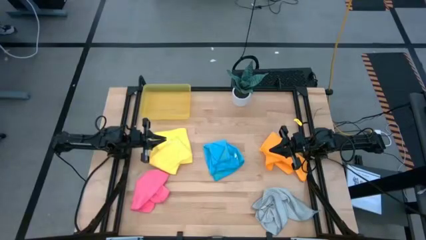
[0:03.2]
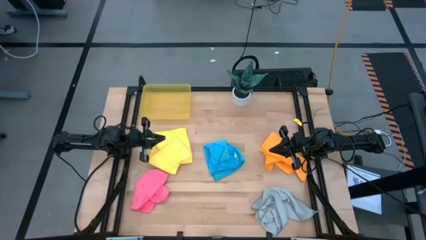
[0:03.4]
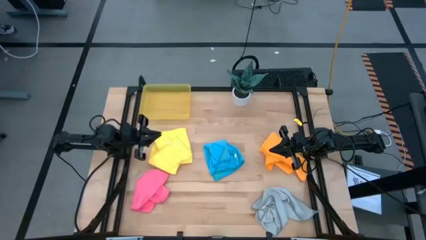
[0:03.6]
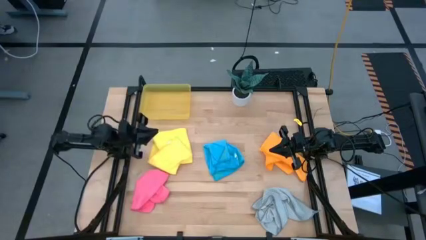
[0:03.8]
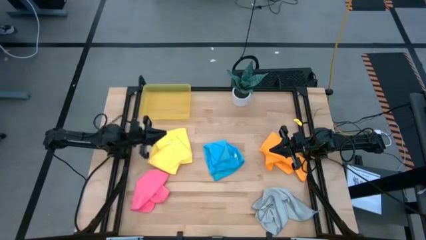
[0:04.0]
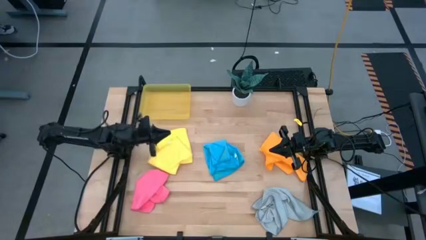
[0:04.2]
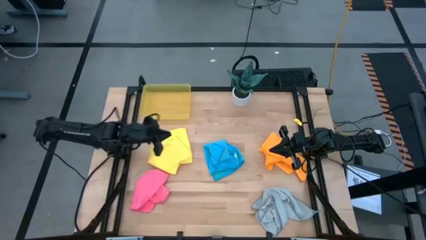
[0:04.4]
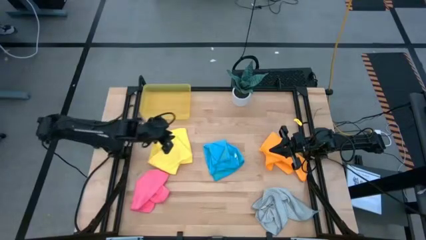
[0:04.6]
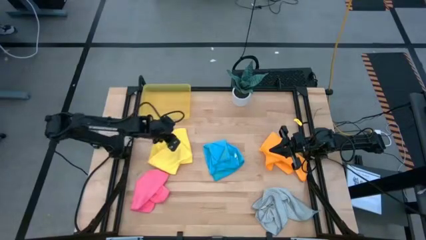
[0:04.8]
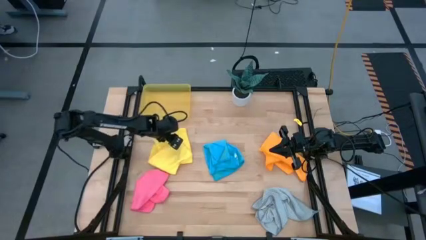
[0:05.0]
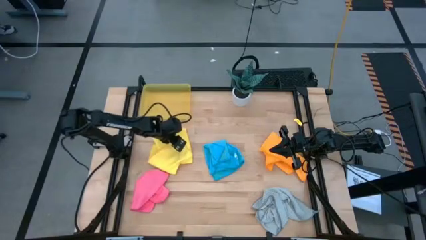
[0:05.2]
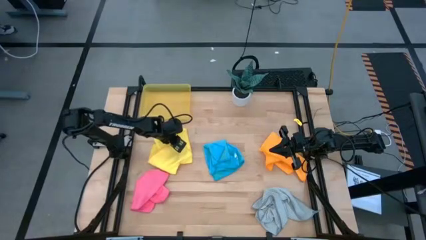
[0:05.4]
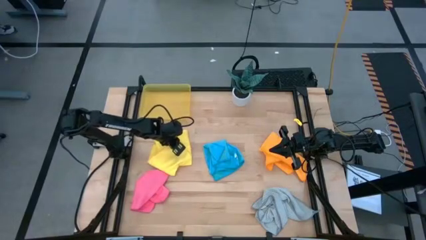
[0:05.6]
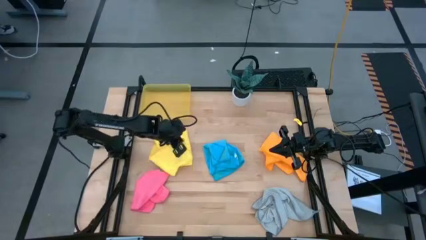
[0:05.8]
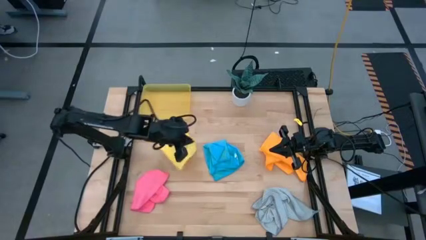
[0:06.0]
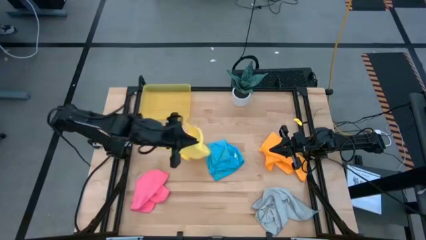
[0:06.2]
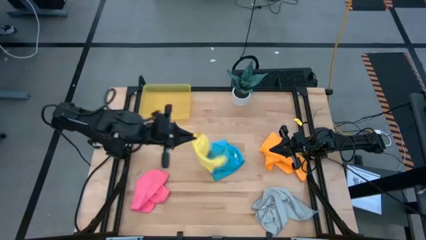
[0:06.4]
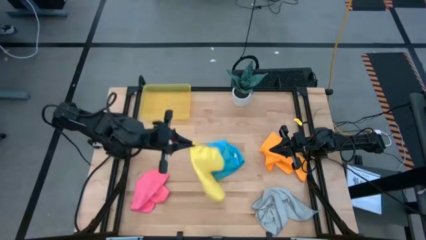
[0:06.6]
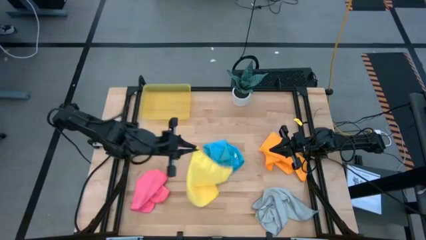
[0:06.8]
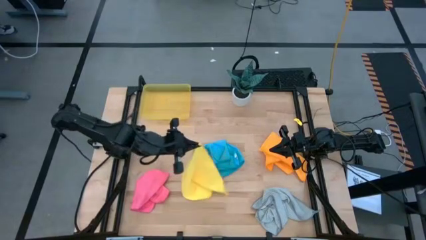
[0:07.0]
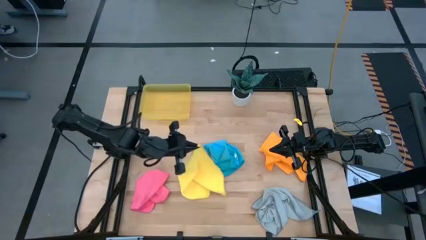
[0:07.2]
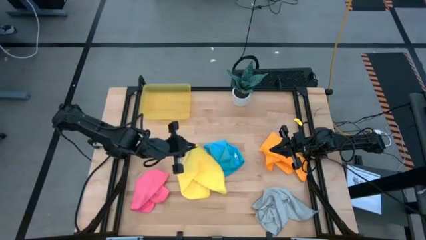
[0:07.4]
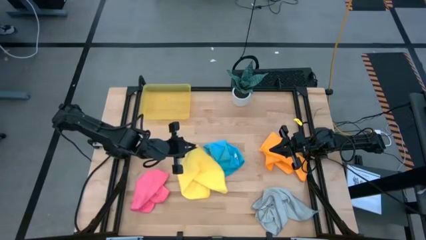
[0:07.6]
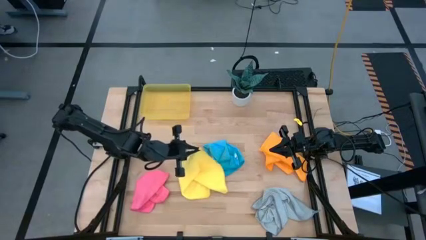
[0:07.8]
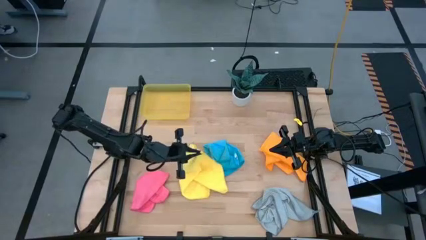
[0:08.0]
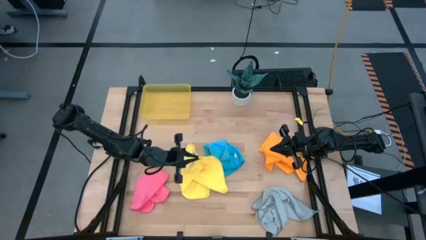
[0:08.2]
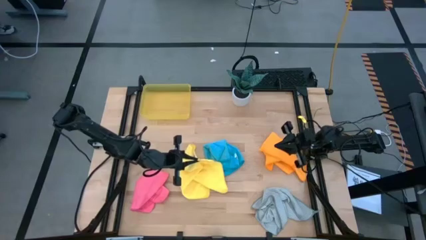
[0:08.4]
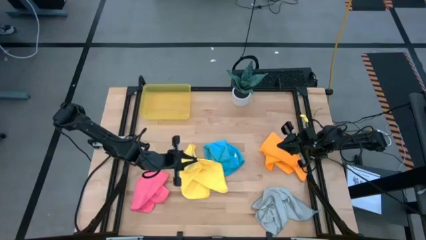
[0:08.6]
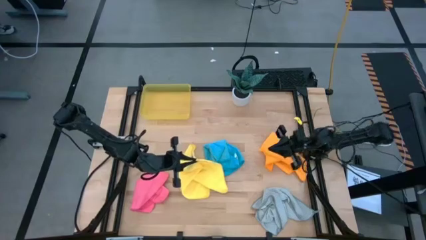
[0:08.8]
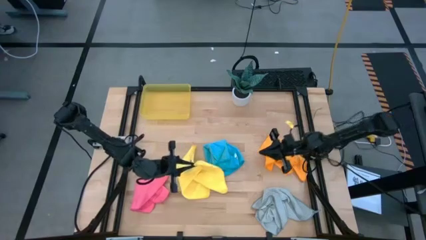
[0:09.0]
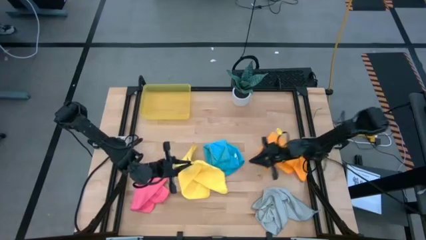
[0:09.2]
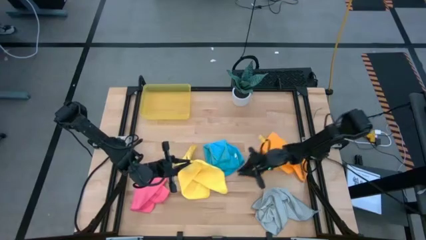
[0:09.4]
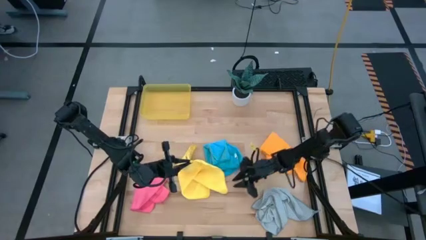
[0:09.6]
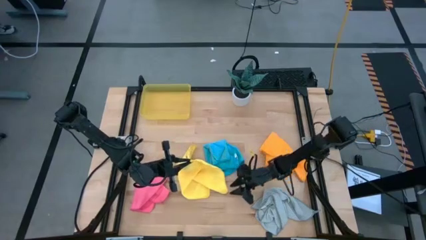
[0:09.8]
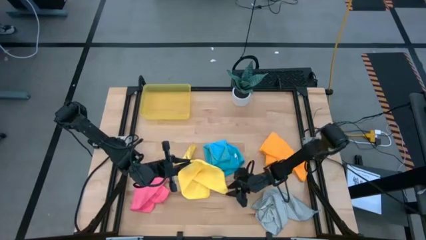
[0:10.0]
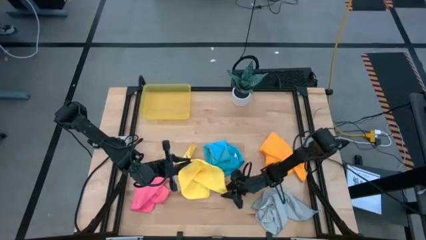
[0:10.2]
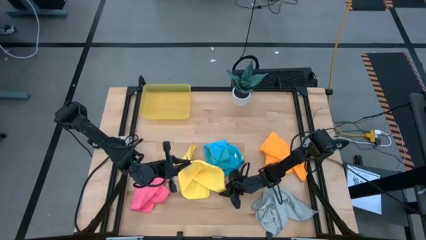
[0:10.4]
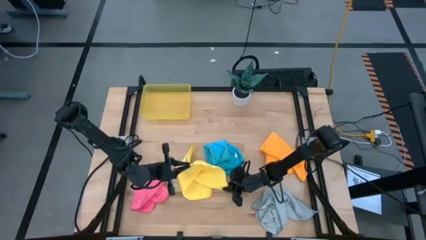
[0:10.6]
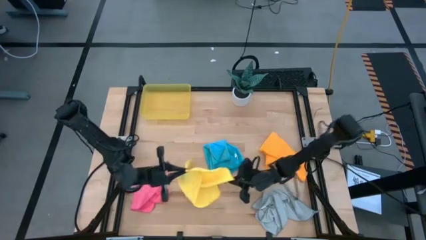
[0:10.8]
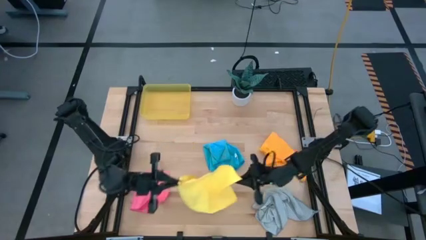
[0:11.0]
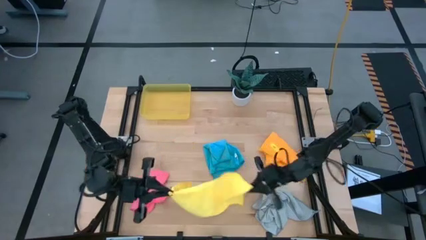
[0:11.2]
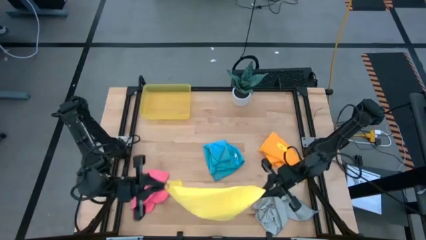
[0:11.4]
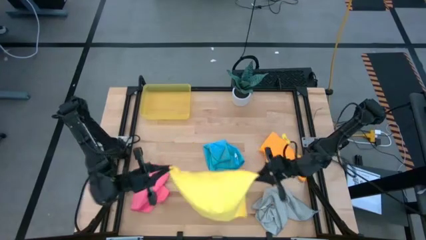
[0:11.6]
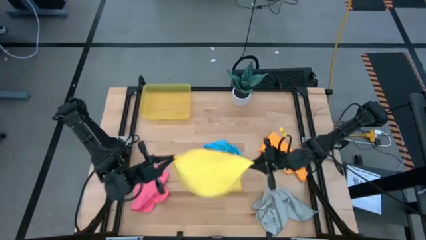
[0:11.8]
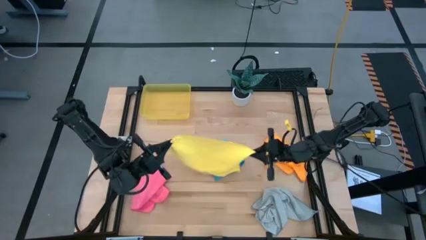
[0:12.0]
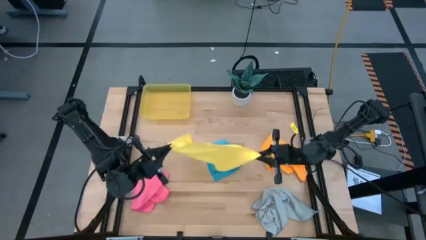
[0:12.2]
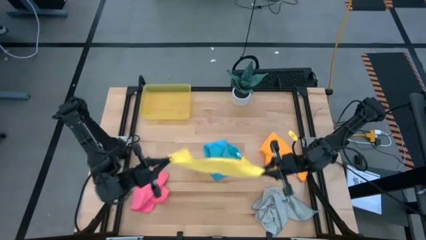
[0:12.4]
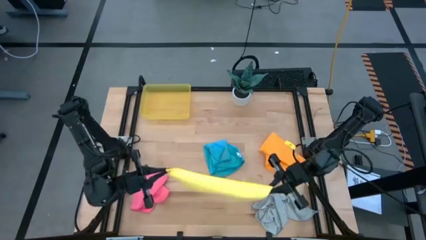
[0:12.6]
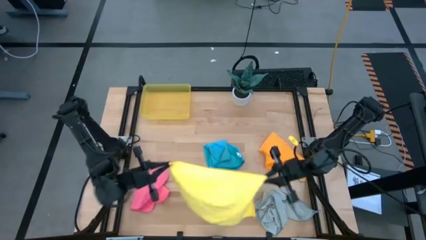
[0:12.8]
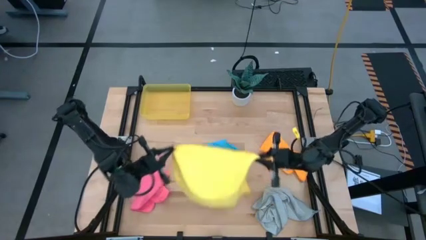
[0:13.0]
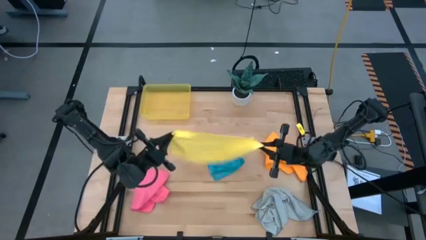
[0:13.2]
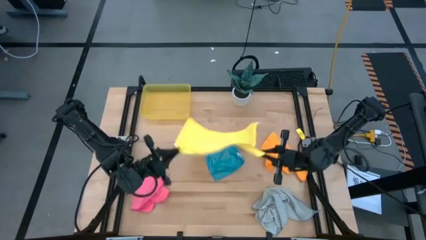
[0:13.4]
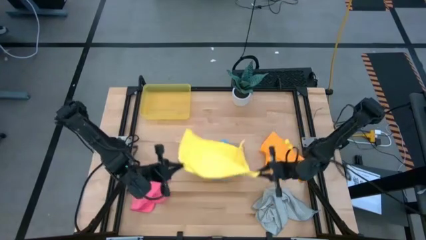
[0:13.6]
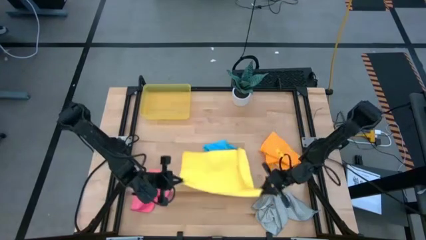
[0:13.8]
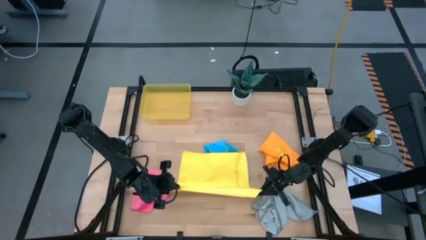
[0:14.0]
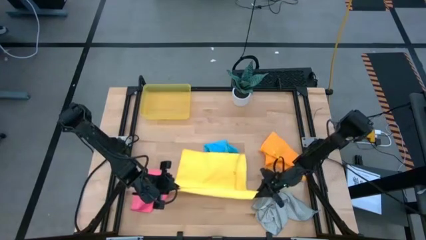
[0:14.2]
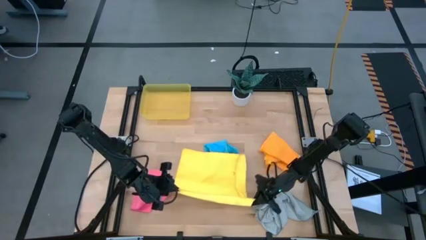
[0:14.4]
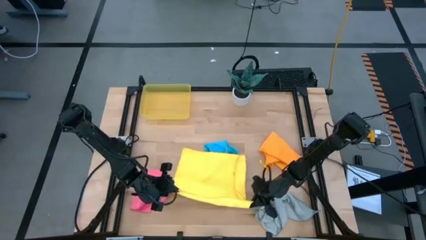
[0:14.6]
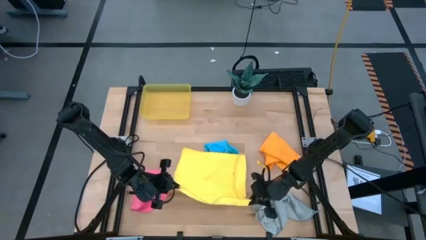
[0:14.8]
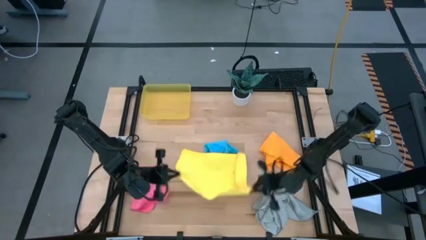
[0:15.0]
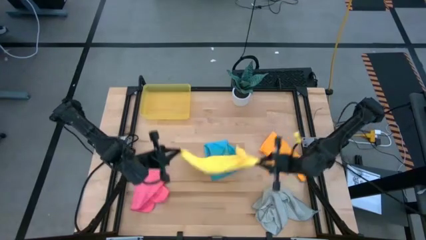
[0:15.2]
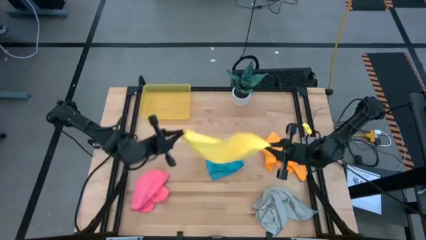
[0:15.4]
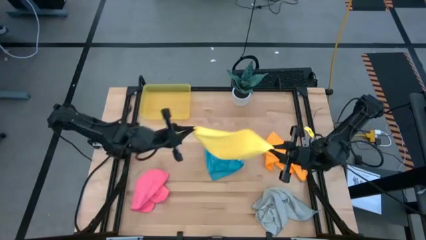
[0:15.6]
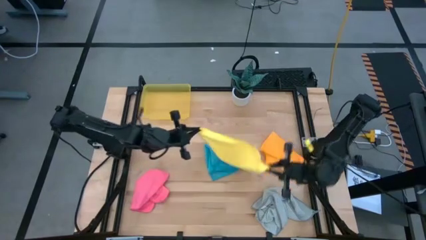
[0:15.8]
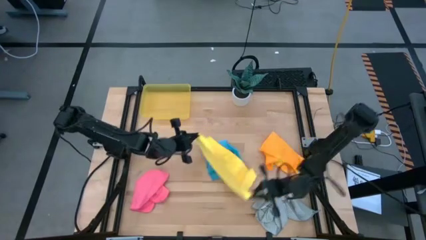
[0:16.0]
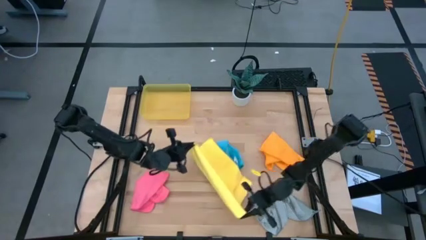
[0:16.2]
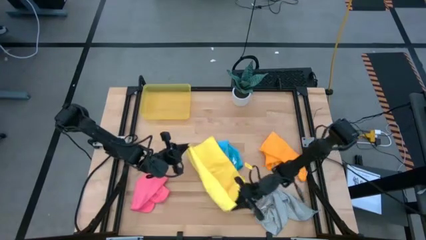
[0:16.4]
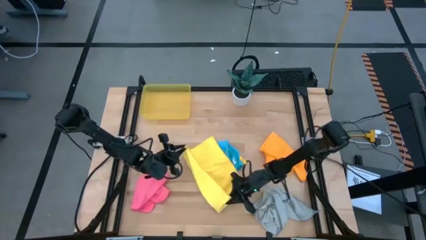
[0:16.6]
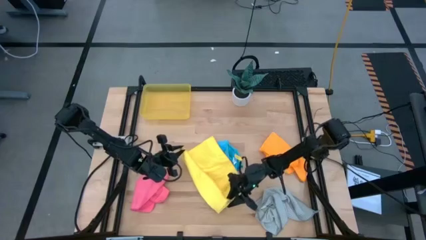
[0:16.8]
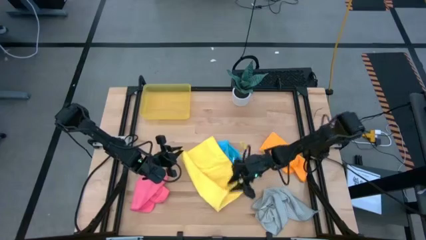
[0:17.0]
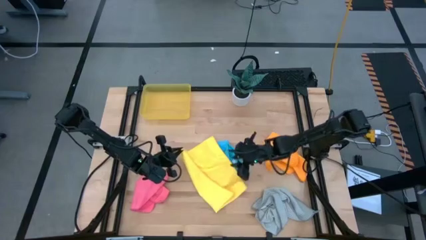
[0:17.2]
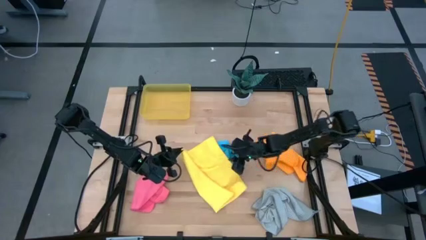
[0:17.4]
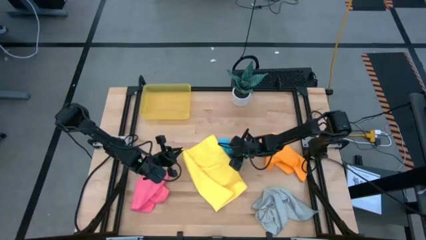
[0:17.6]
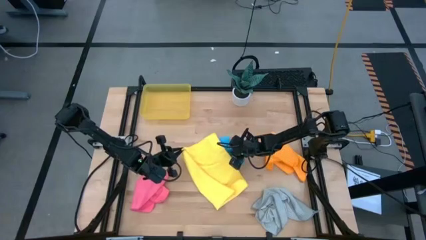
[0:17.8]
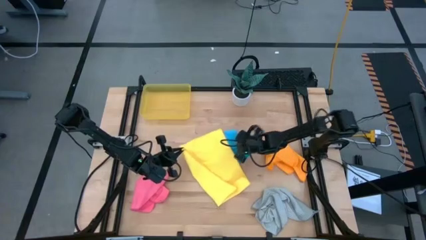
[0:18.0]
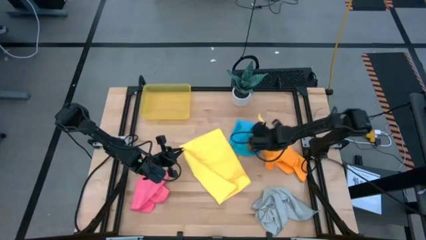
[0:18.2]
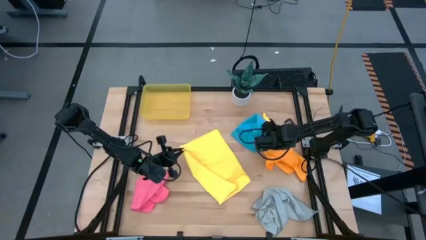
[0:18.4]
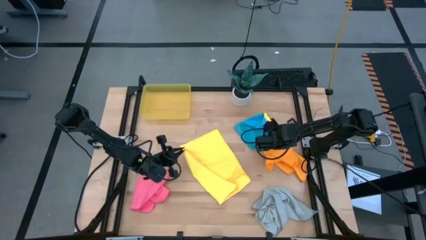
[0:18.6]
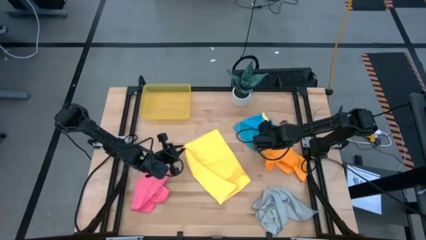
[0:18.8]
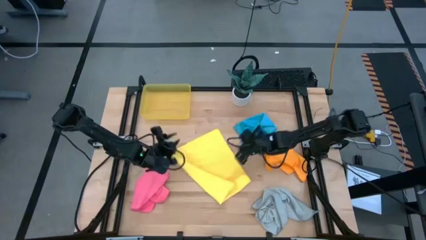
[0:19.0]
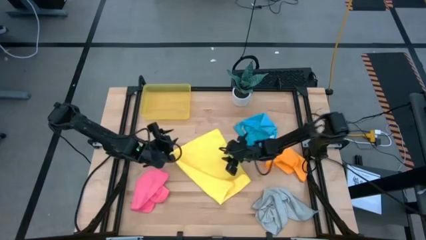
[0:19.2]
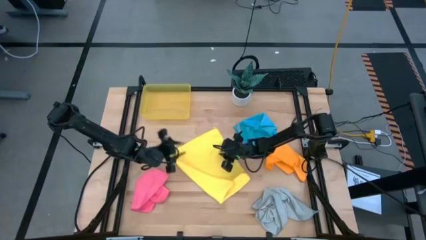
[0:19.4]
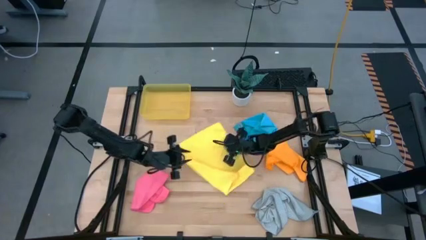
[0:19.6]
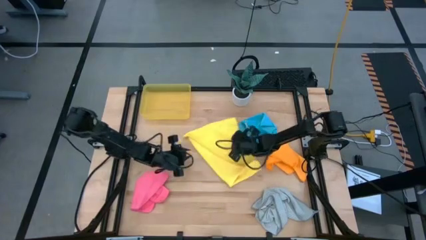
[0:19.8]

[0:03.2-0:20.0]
Task: Fold microfiber towels
Fold the yellow microfiber cloth
